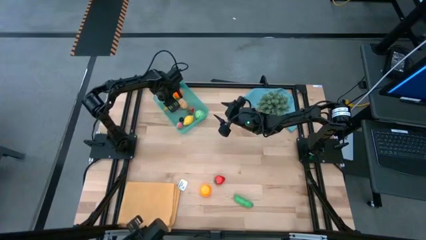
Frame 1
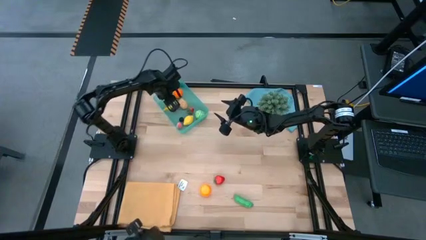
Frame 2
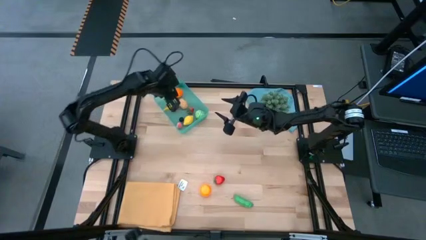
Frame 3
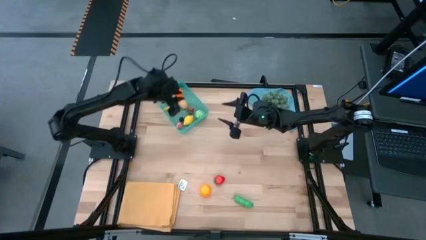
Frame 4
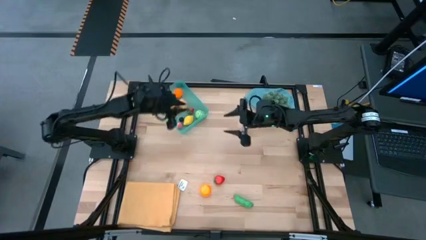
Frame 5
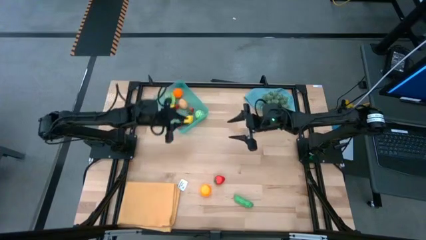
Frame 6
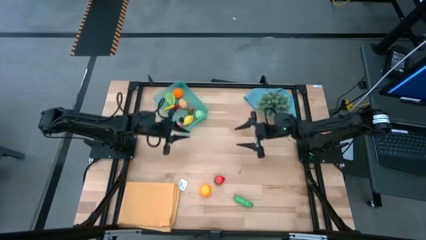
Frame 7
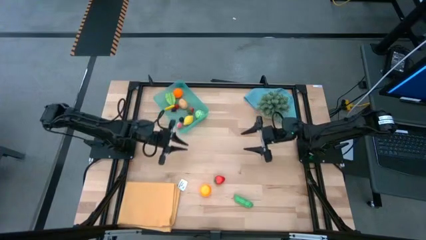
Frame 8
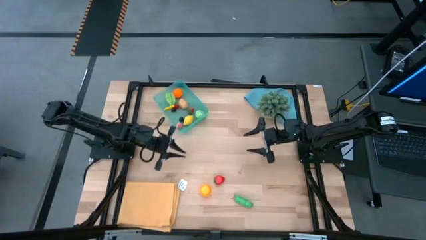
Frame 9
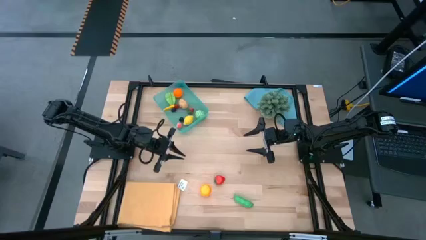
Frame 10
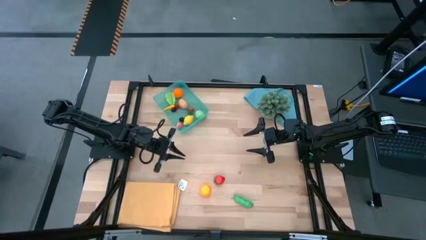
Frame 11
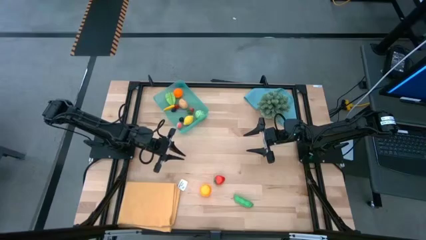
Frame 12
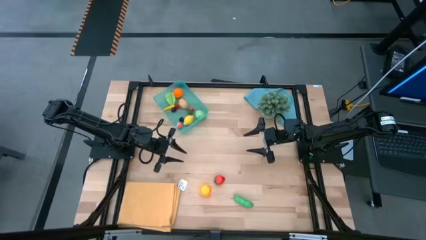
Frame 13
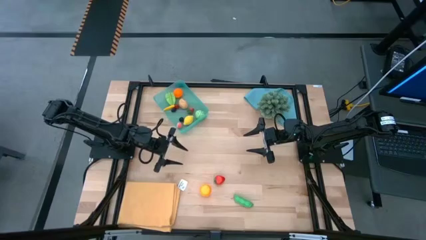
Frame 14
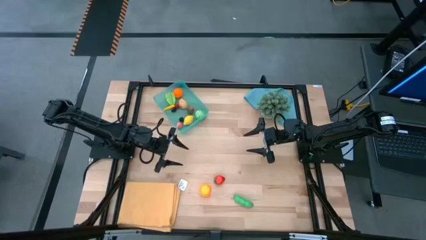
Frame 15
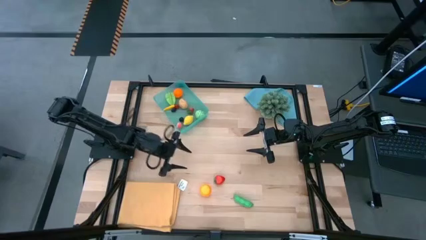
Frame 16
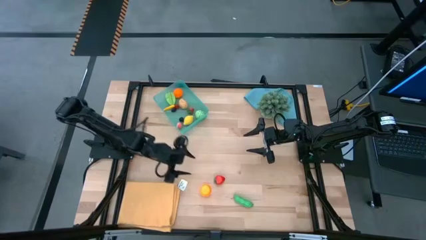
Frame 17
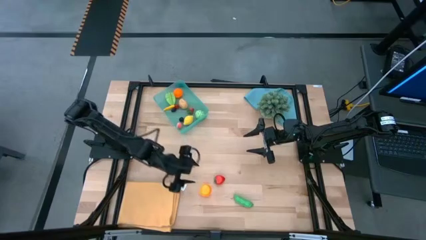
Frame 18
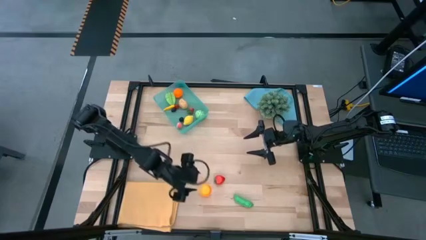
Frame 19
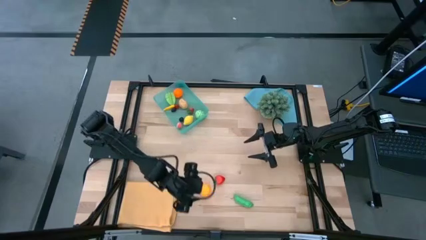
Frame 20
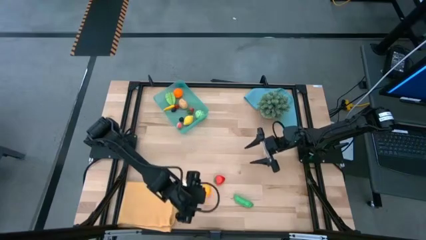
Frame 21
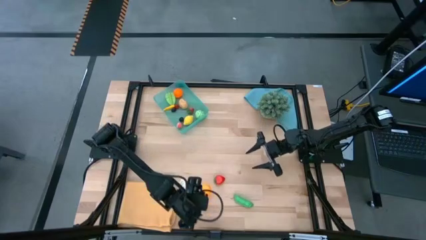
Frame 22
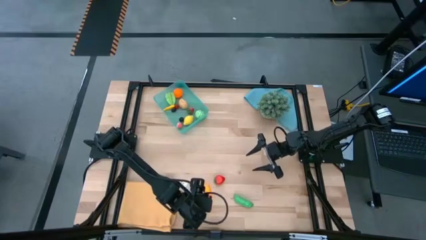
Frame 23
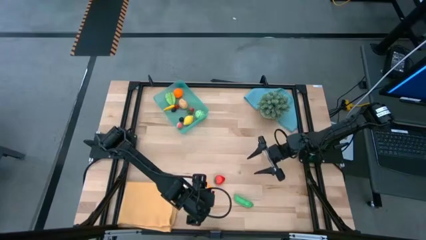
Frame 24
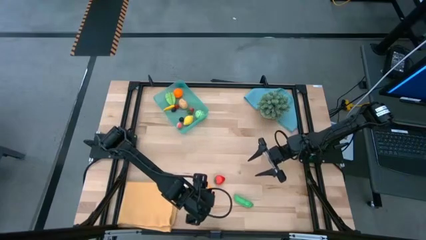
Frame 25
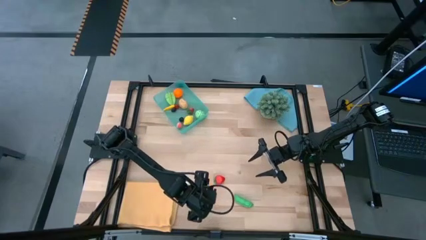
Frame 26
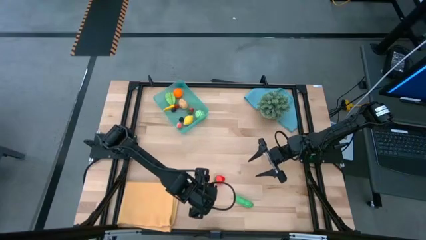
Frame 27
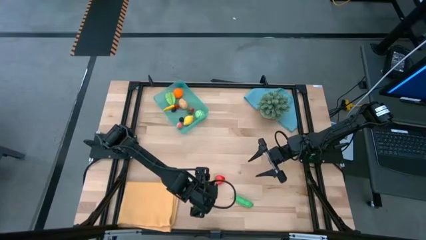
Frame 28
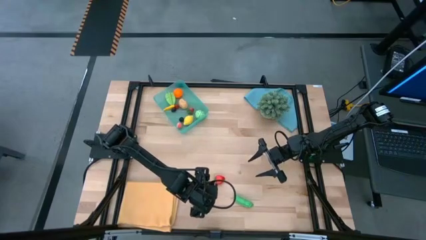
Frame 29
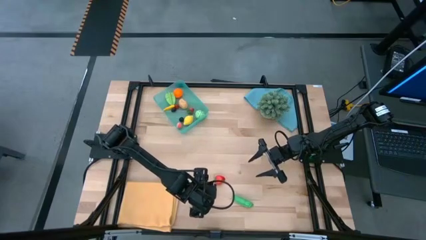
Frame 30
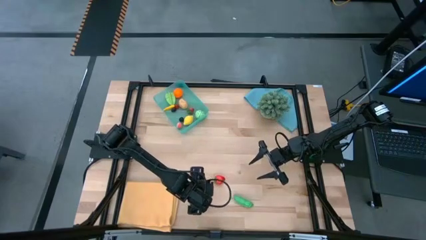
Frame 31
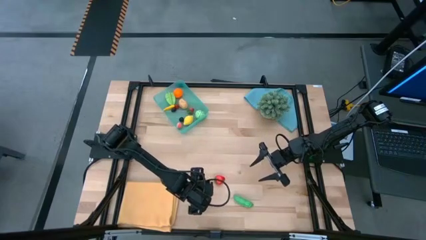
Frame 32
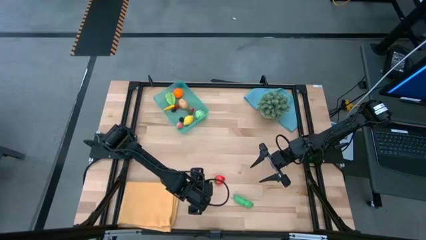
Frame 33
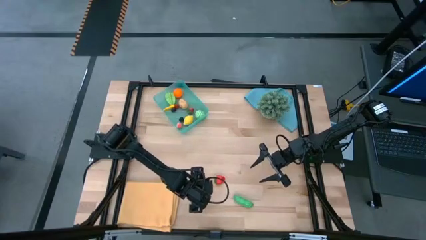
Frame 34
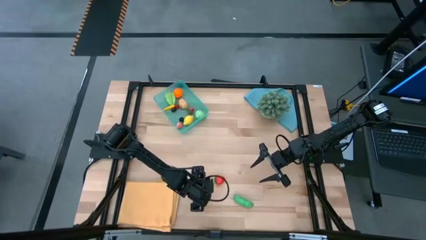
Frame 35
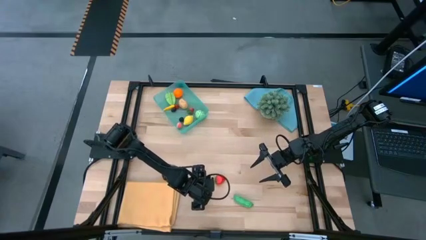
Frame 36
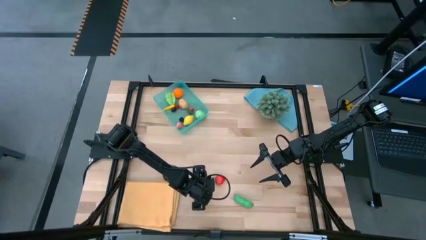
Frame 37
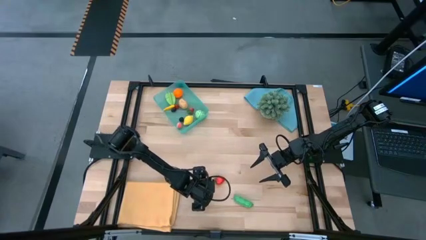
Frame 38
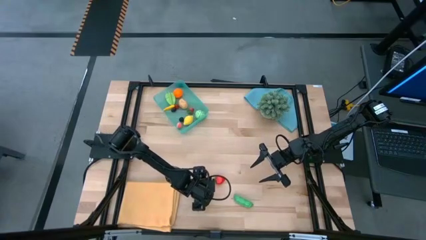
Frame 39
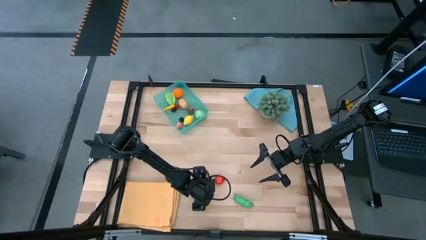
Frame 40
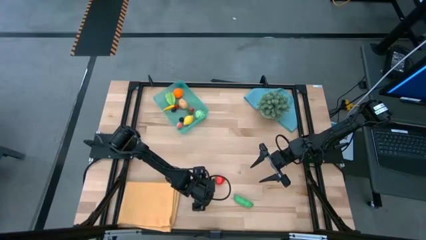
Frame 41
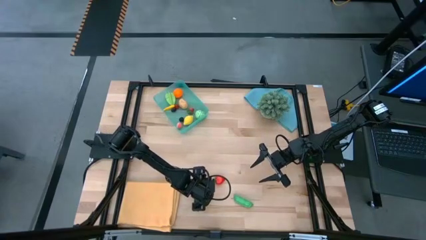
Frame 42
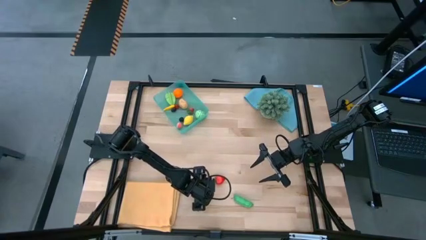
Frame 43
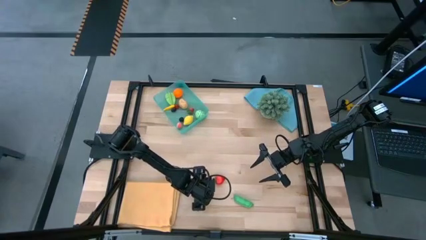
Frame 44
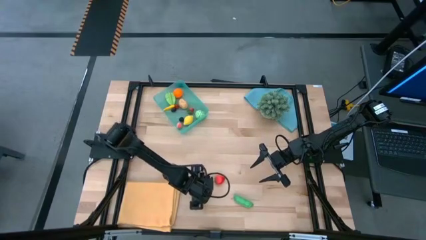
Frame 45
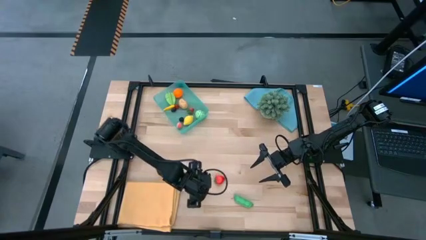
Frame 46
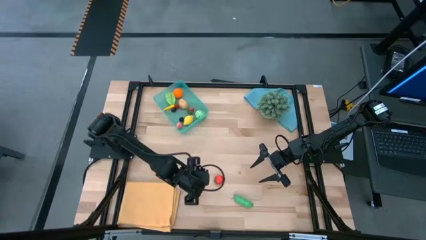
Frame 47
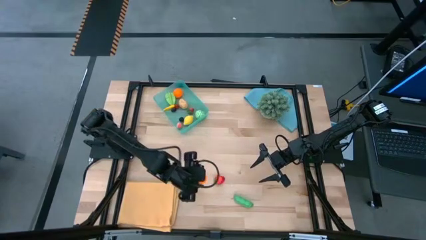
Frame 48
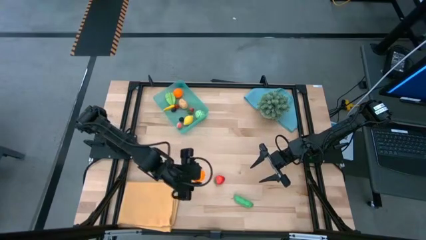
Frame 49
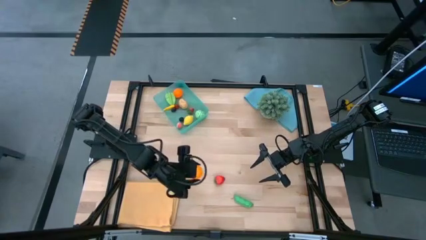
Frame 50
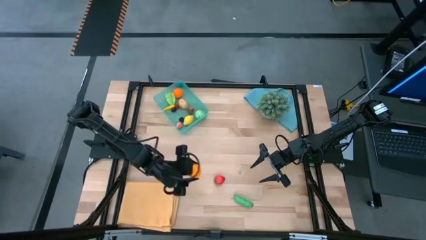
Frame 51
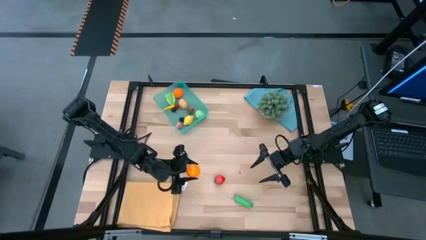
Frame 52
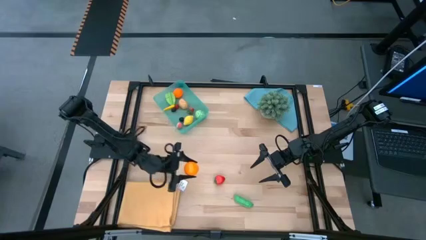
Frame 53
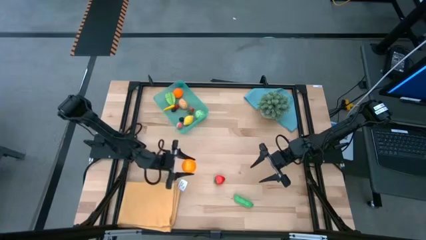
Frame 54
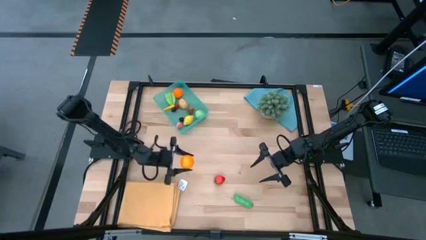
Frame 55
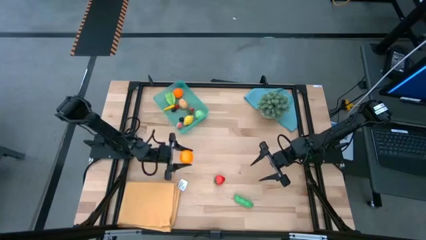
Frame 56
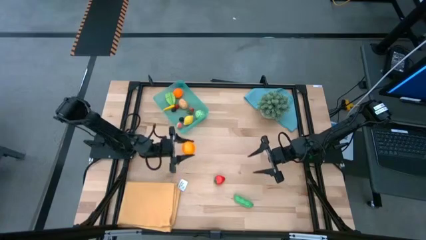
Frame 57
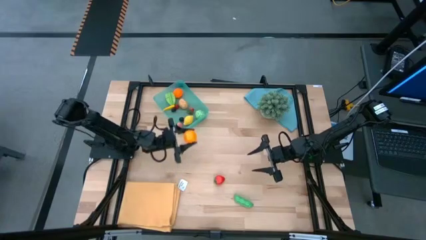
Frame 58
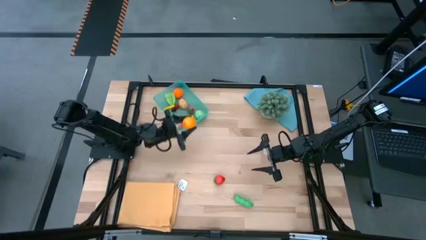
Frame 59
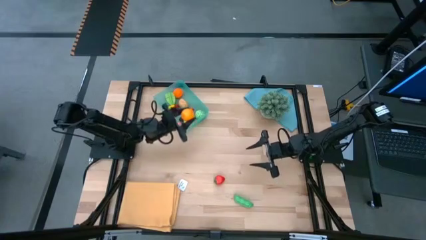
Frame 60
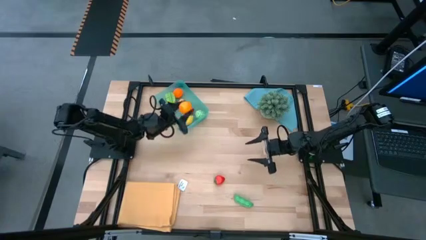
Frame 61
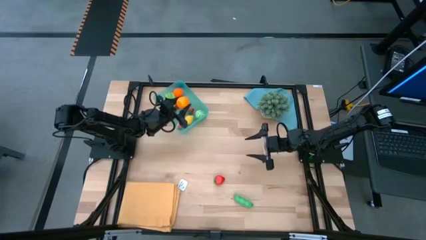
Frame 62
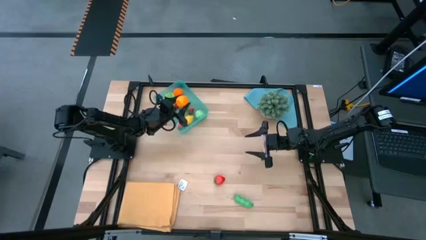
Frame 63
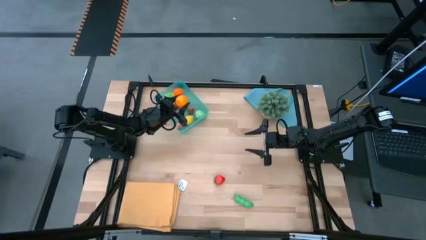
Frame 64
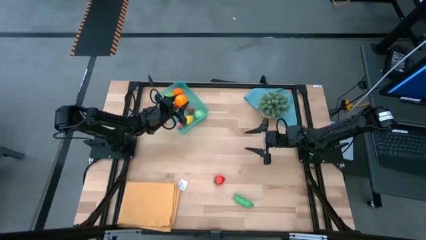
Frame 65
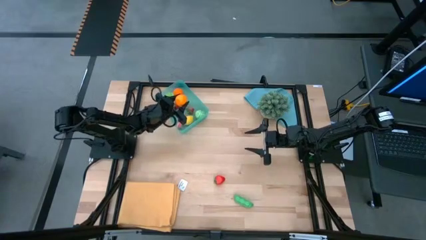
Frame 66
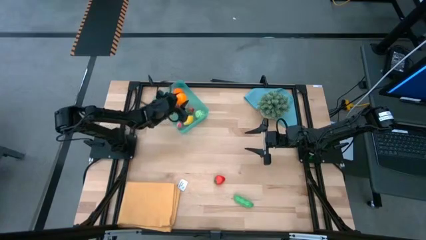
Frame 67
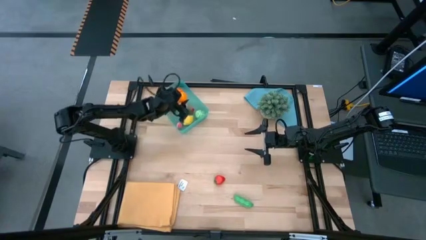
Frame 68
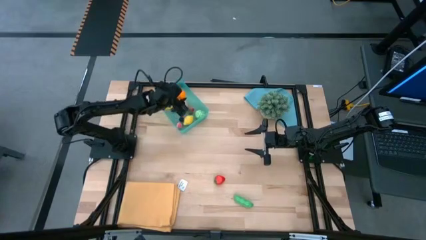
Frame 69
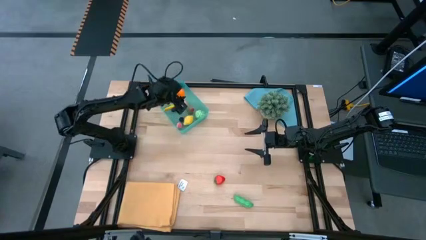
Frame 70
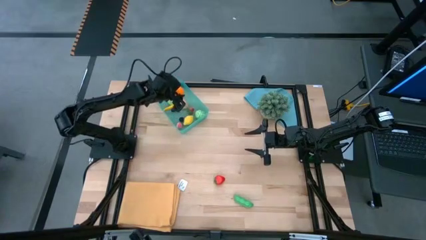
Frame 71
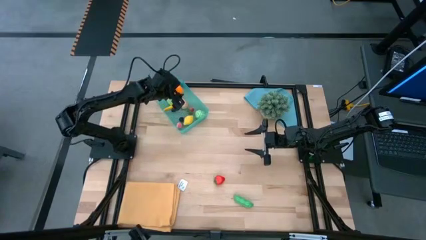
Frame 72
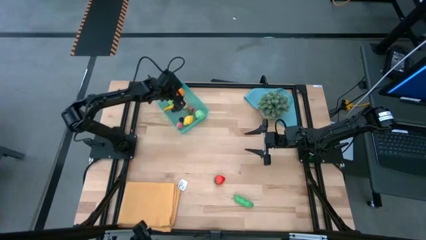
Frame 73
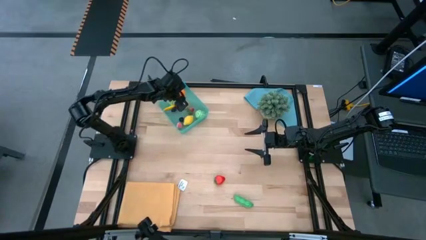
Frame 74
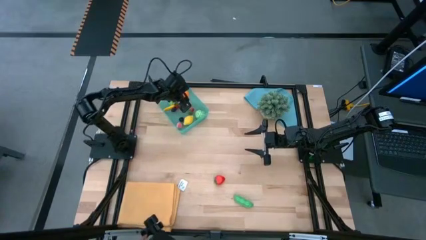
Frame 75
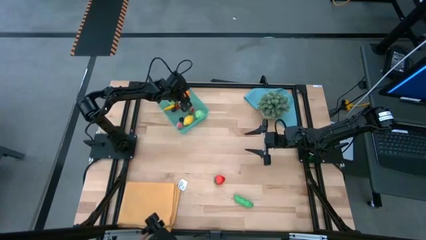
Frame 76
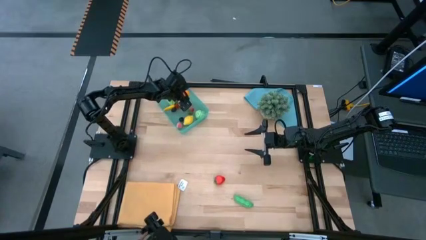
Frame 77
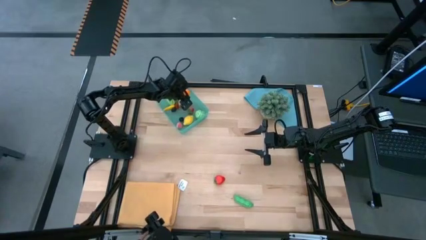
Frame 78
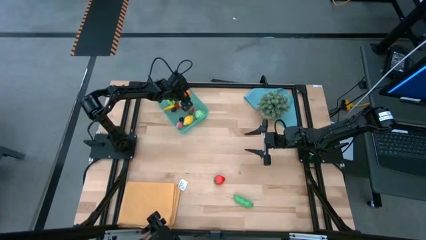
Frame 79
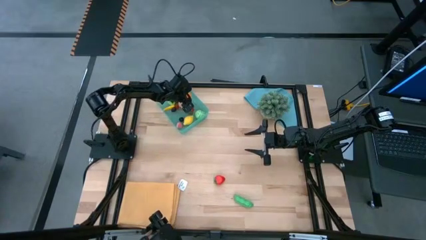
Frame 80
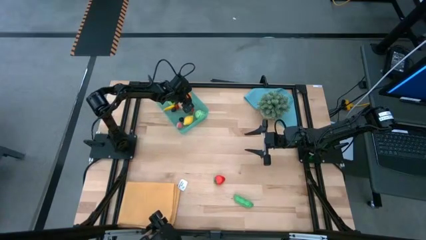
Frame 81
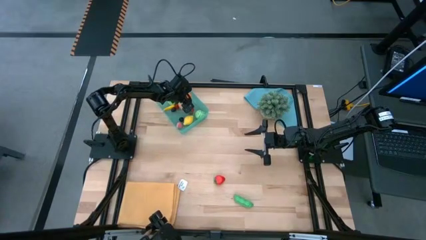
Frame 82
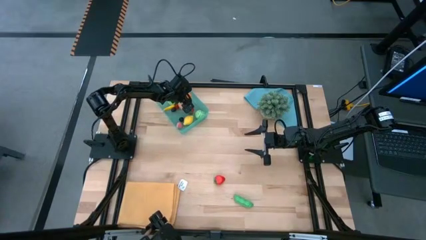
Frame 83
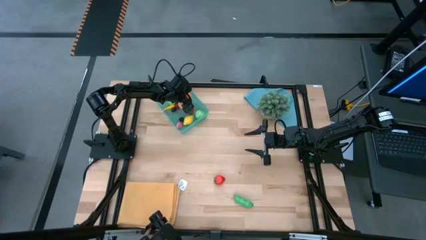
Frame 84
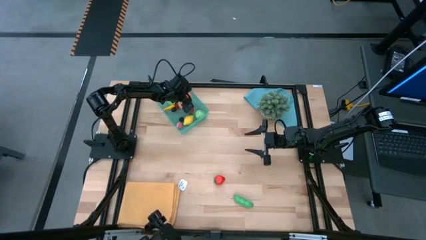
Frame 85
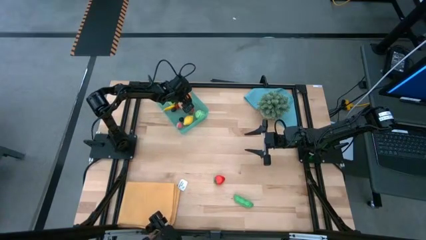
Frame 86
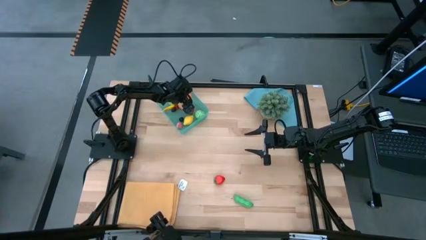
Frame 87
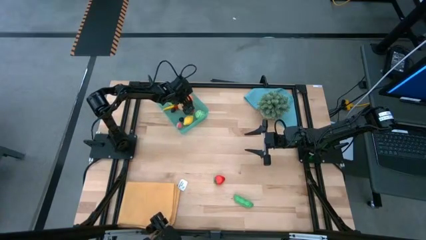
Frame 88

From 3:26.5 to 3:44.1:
Task: Pick and placing Produce into tupperware
Put the orange into the blue bin
